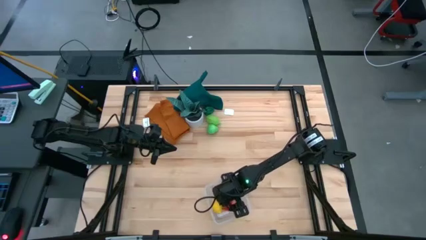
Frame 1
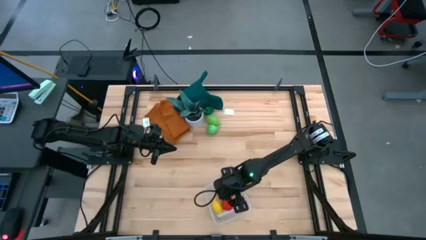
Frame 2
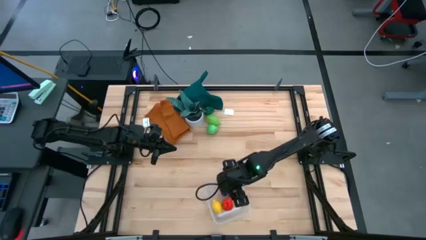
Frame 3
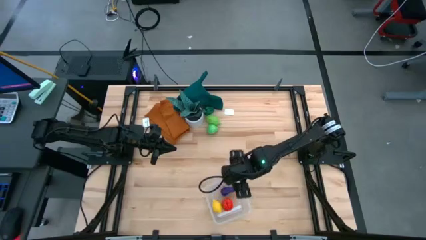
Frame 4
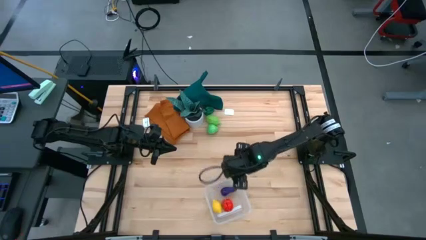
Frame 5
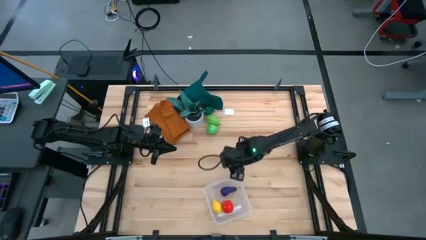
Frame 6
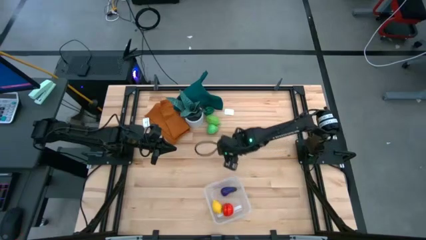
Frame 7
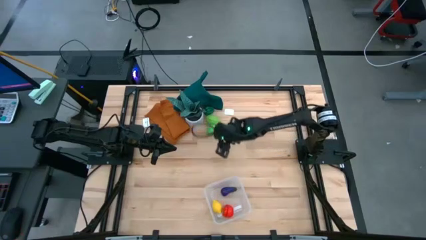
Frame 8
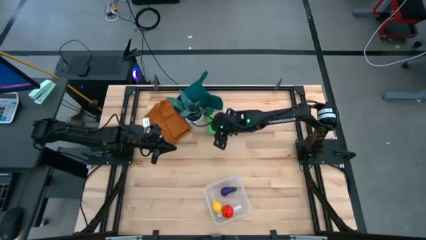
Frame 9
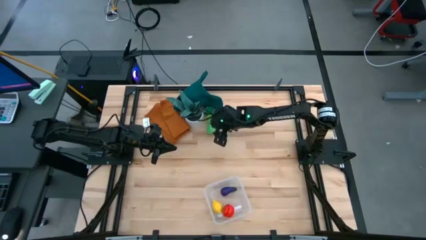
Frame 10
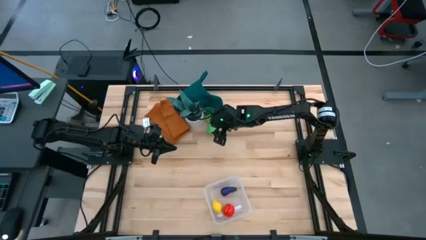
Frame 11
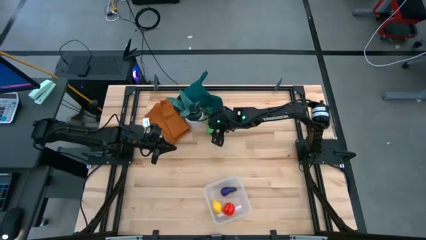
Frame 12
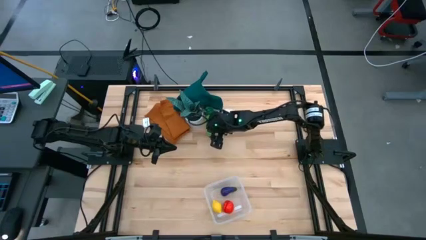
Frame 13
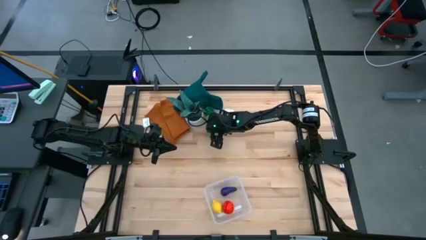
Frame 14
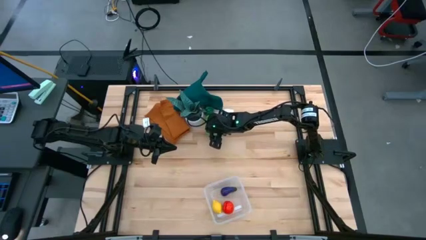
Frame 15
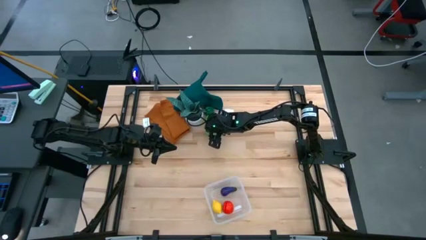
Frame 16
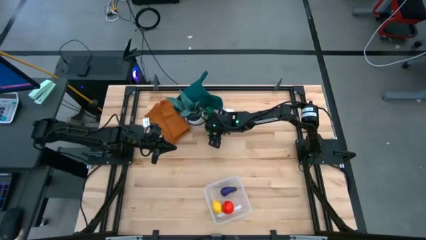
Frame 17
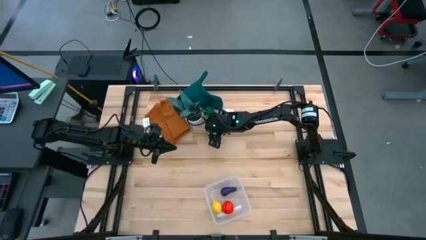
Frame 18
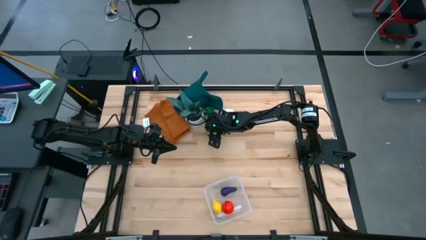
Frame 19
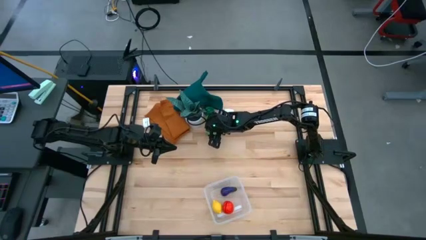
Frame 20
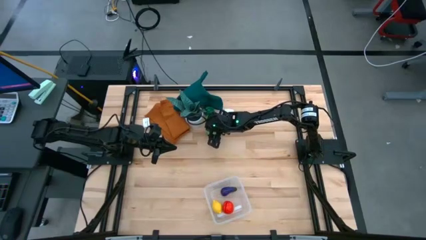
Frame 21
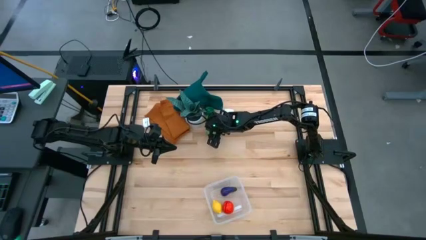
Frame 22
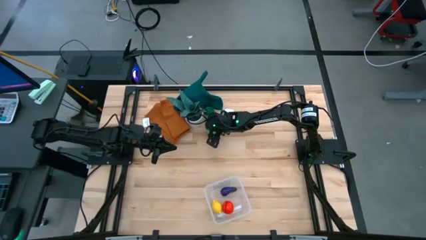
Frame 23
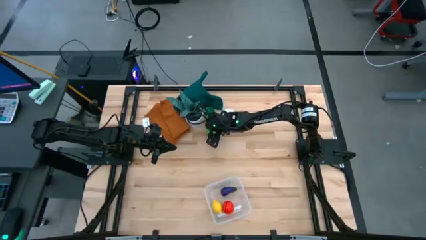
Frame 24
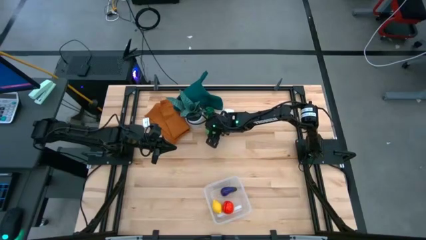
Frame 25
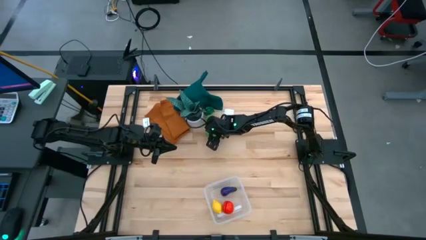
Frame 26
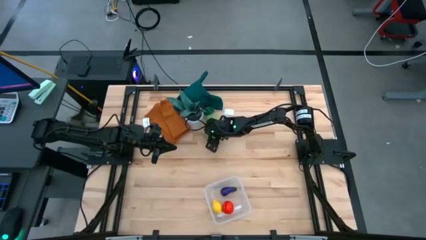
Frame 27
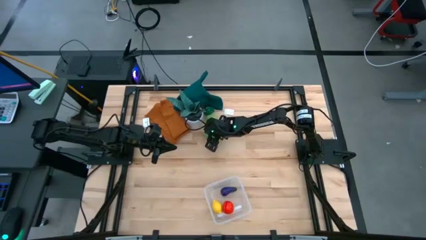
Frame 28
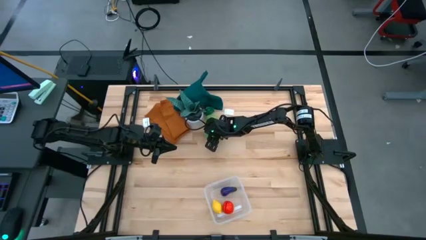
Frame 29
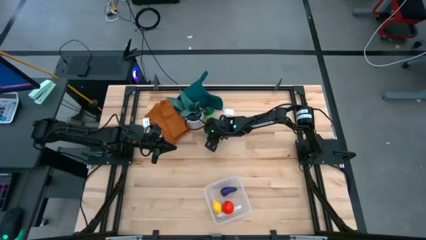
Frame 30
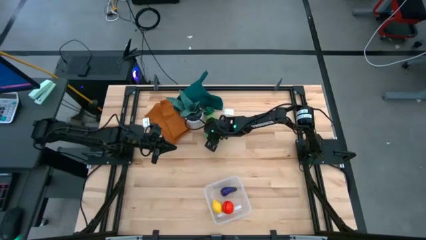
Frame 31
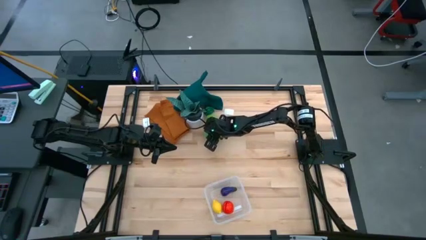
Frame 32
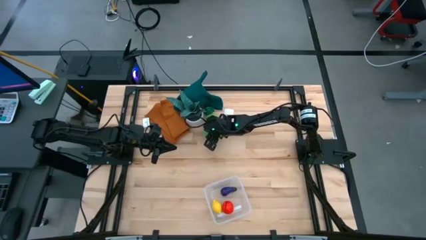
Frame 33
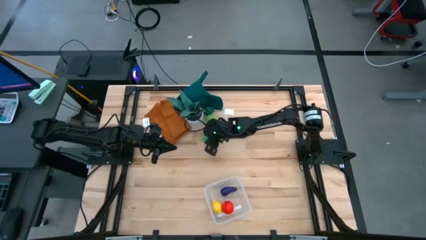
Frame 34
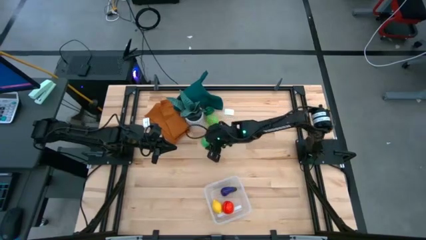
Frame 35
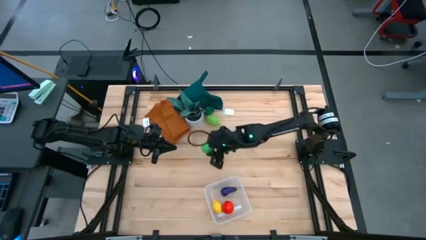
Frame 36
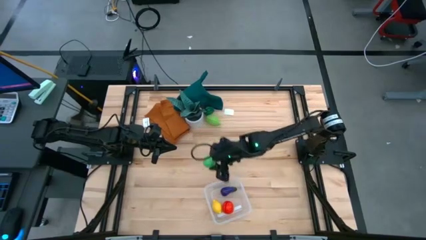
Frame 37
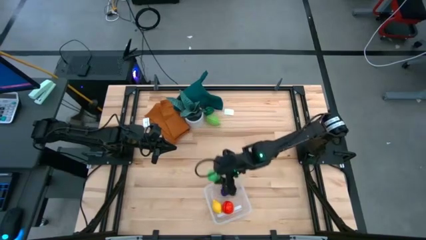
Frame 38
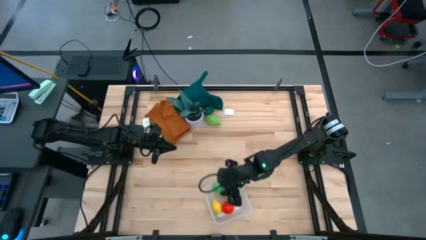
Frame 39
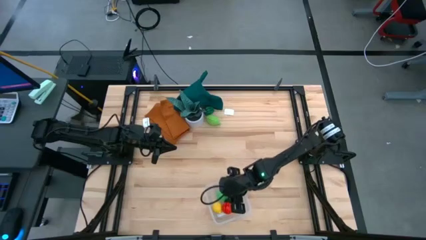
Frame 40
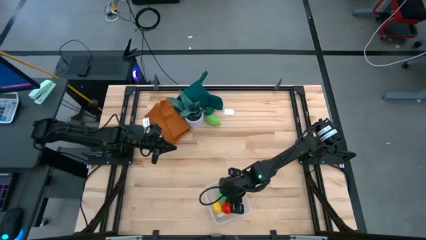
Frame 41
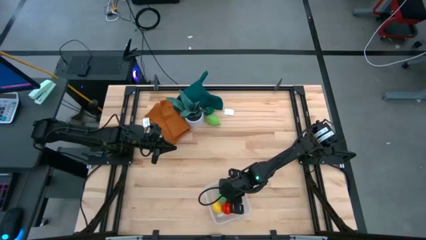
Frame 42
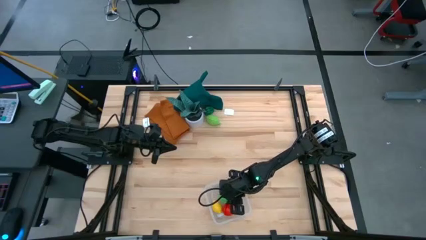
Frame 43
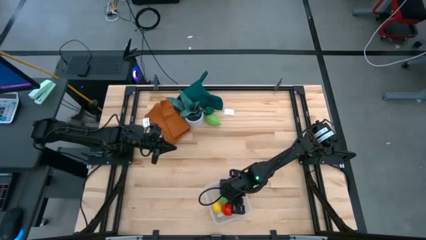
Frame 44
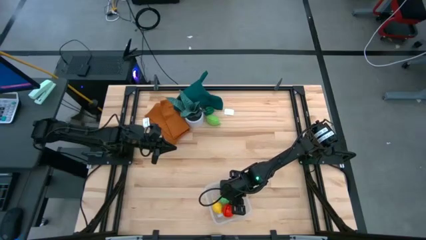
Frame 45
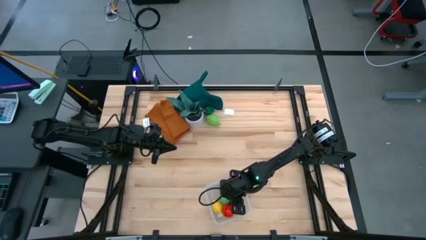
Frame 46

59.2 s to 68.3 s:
Task: Pick and placing Produce into tupperware
Put the pear into the transparent bin

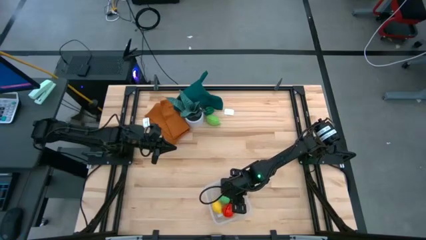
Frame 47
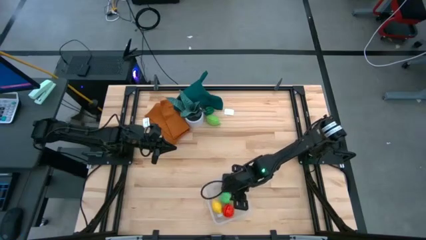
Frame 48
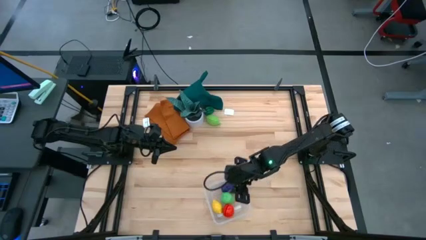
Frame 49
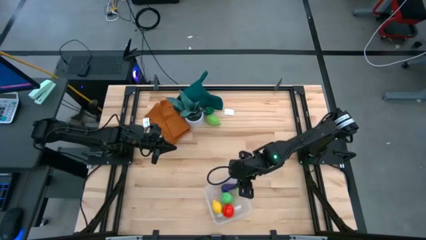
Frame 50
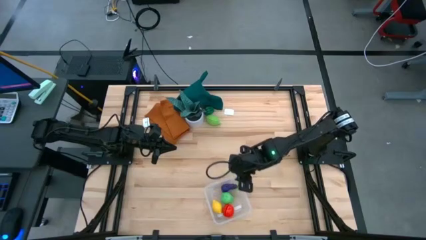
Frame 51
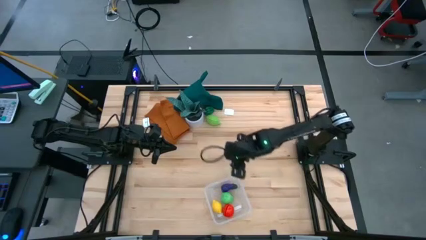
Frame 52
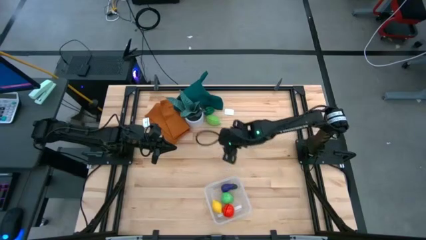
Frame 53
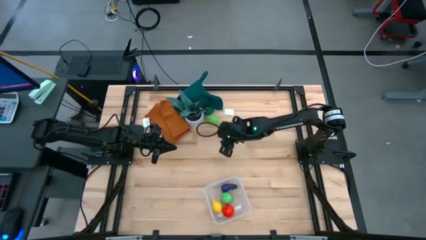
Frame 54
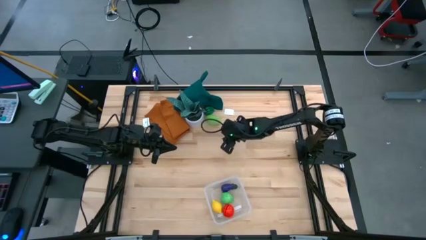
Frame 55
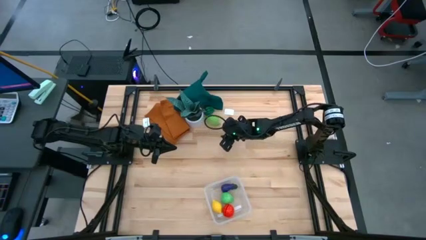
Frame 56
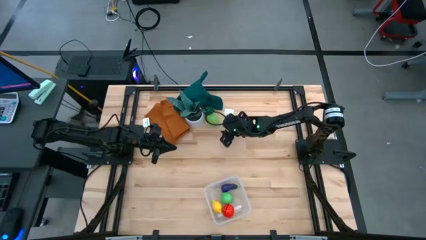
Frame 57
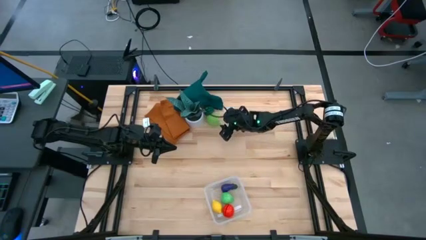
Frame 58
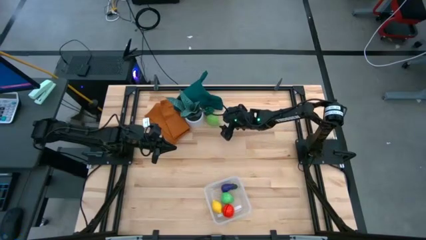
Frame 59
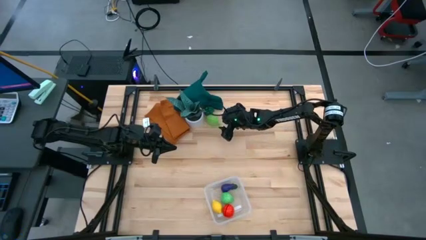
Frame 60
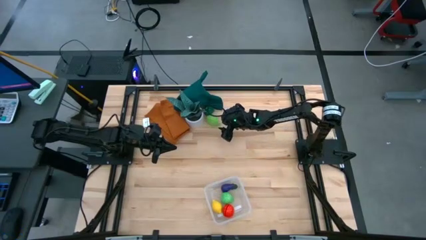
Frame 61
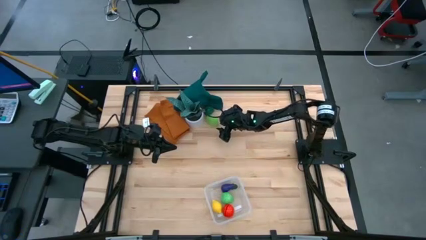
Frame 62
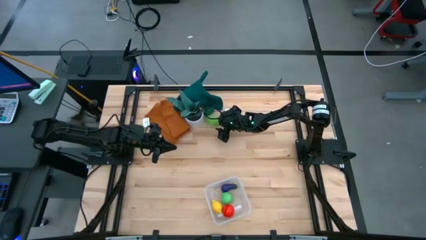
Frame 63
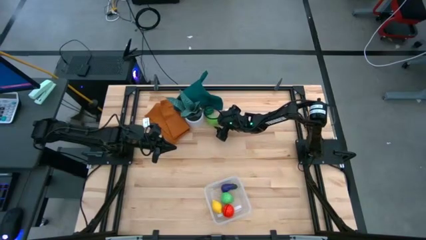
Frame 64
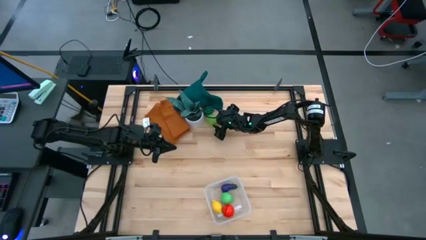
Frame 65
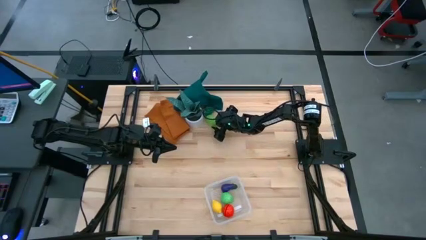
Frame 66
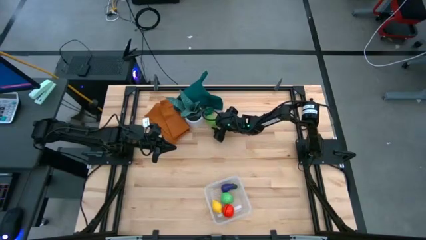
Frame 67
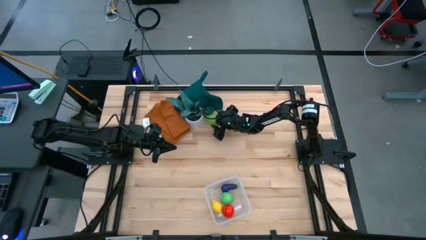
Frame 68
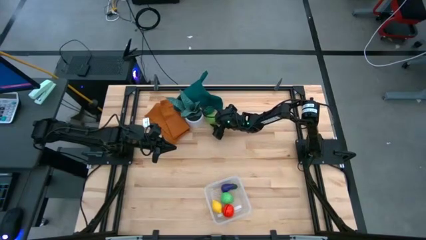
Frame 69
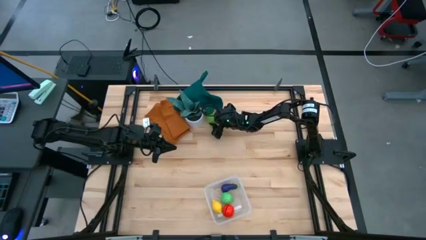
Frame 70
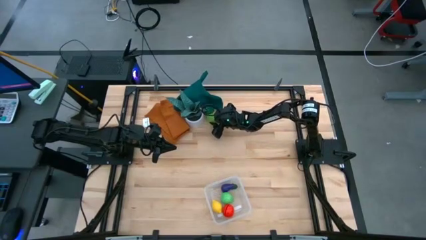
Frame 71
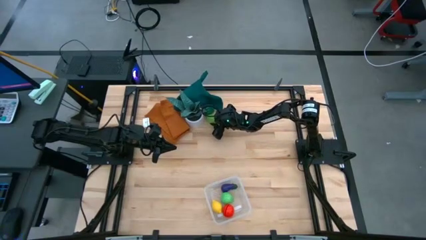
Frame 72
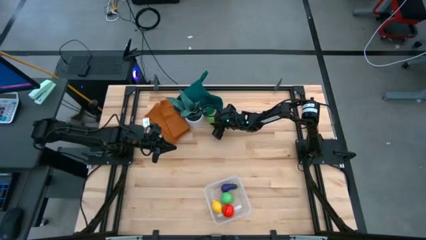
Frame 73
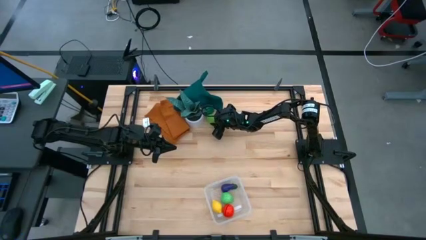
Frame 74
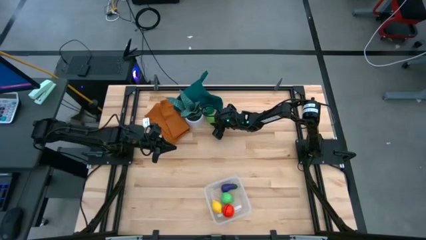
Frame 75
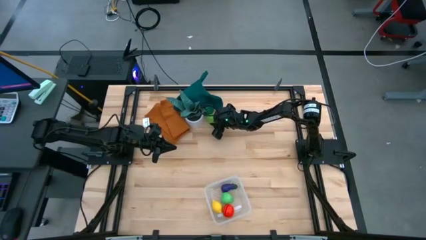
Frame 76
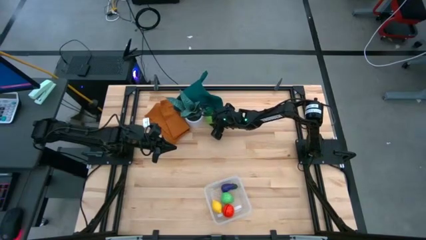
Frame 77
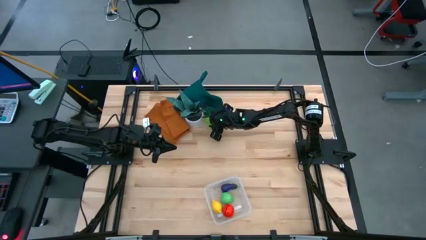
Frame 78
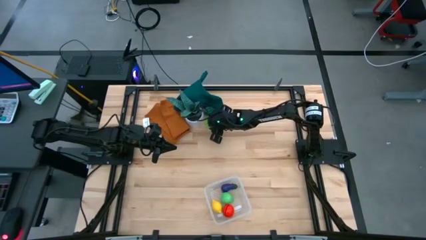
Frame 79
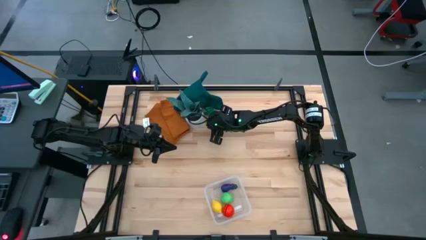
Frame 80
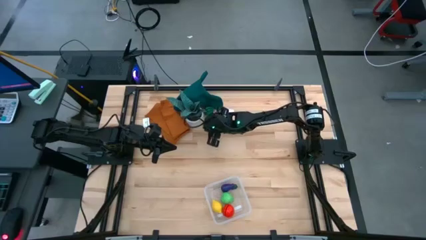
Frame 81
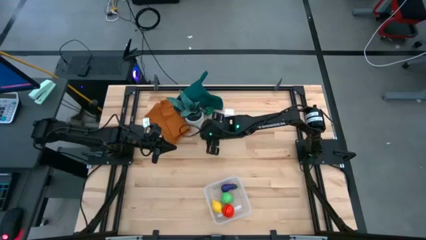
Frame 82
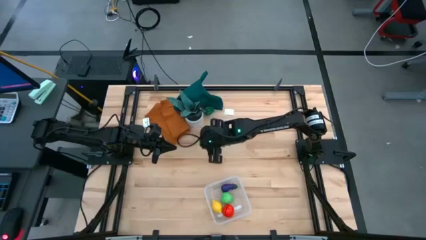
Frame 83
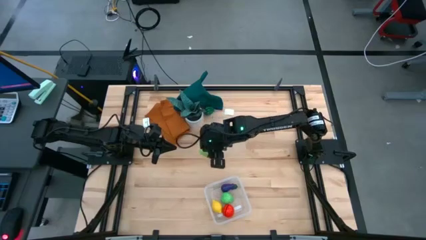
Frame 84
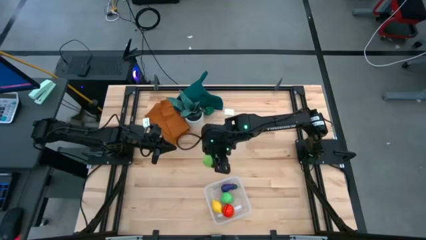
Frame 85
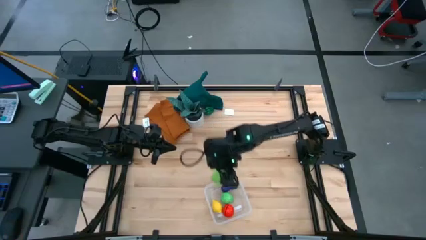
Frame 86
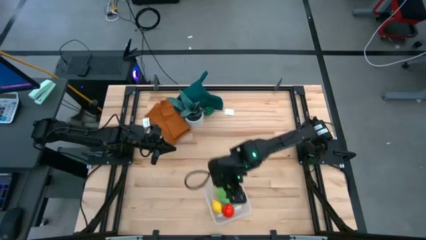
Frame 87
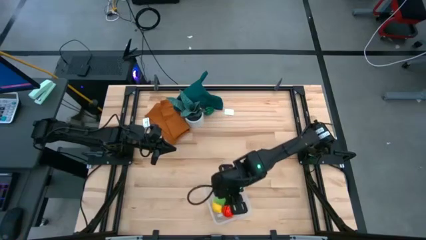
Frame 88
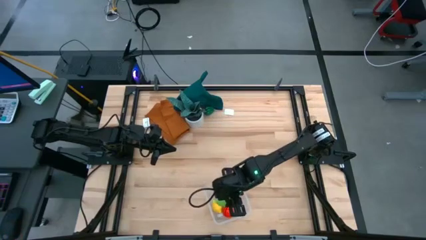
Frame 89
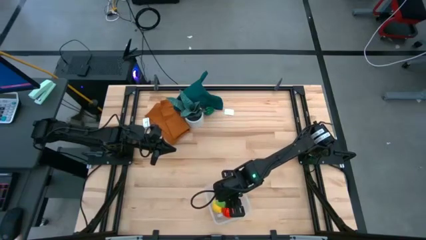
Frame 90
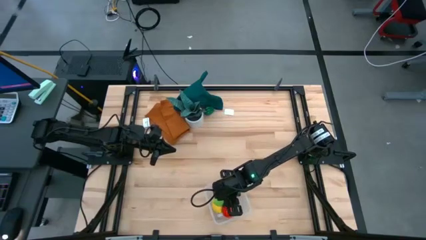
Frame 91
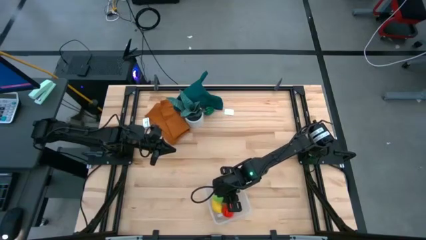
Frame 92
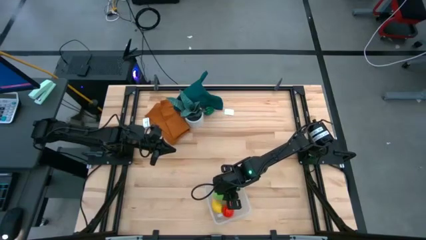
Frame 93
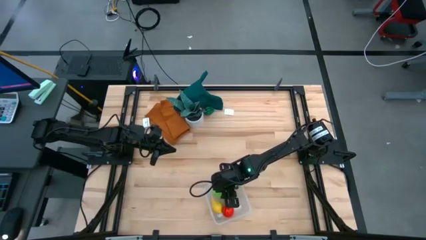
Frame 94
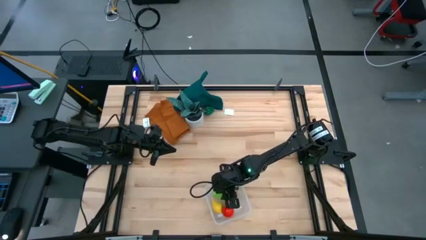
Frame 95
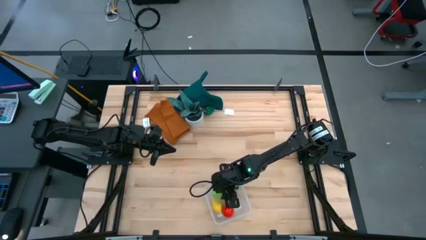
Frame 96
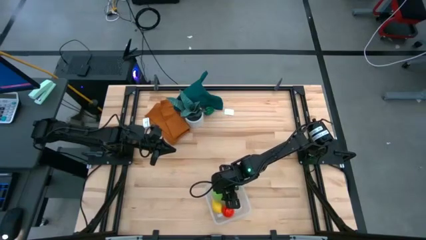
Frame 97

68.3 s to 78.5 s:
Put the melon into the transparent bin
